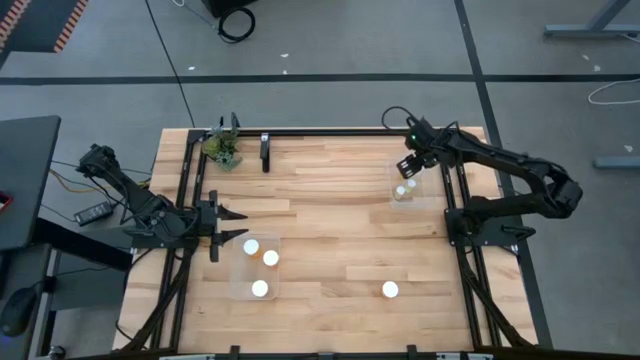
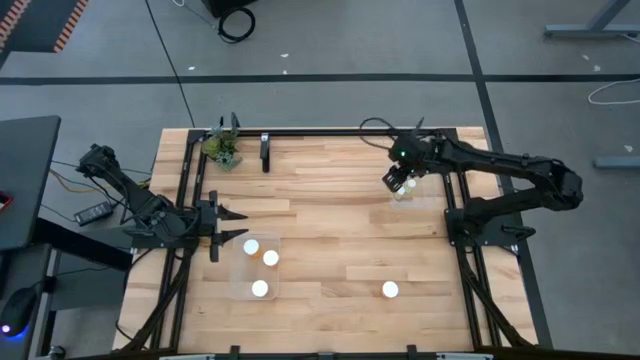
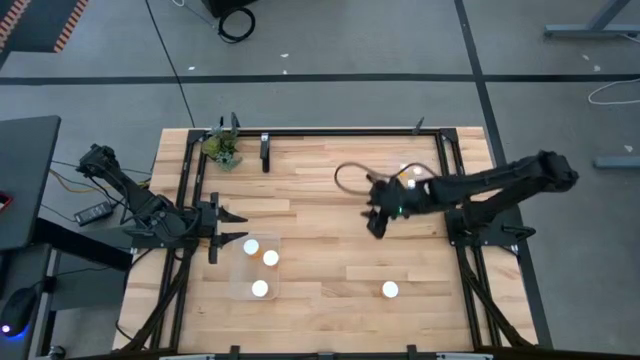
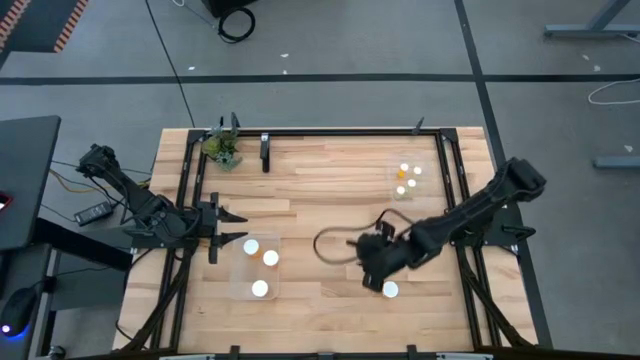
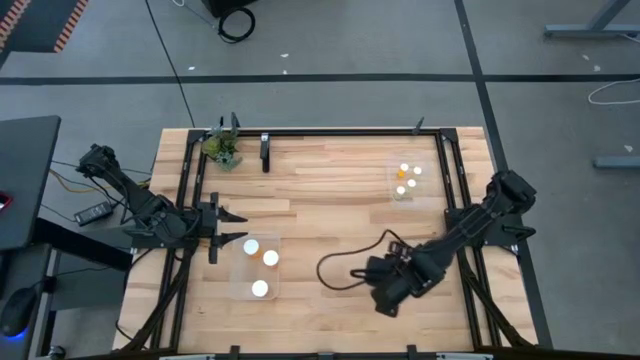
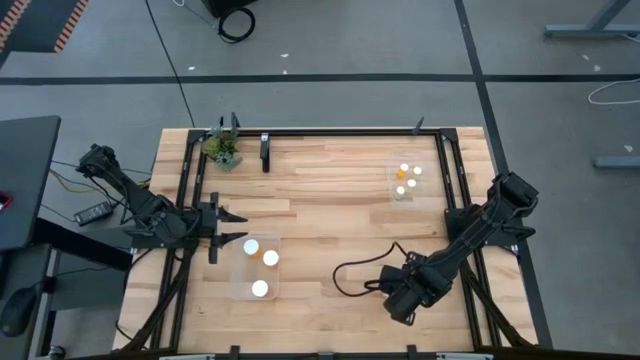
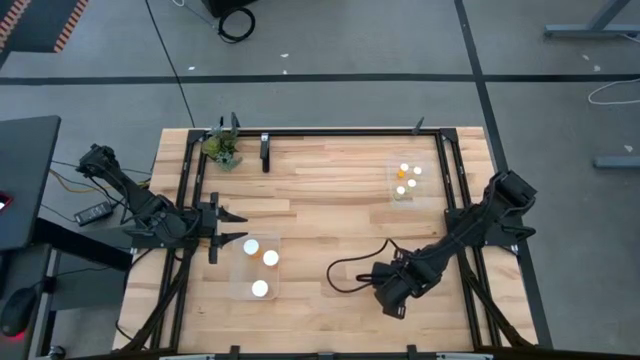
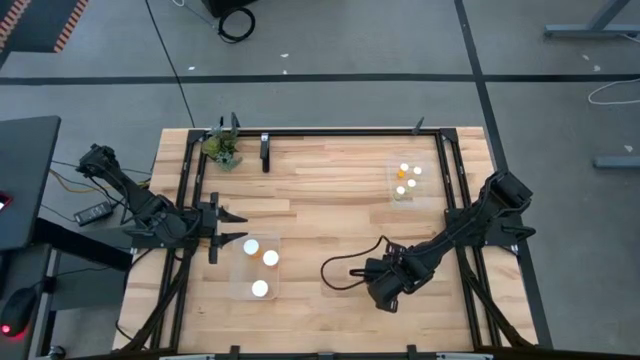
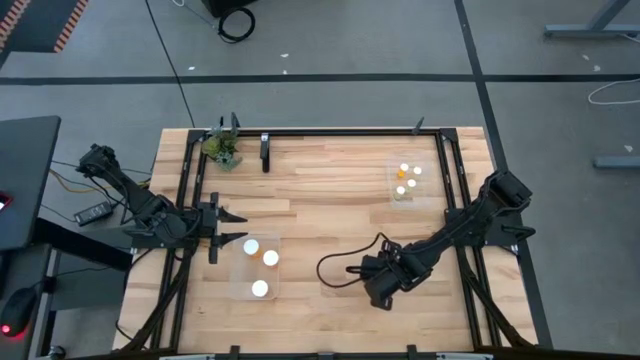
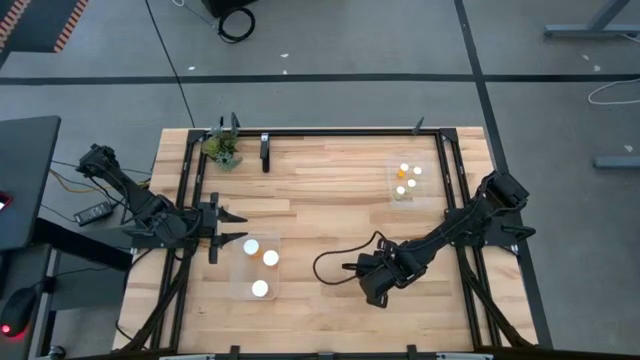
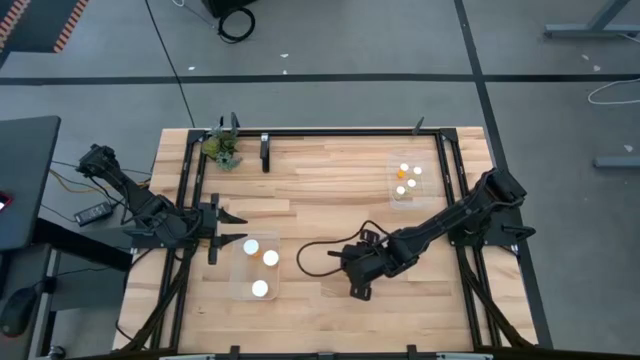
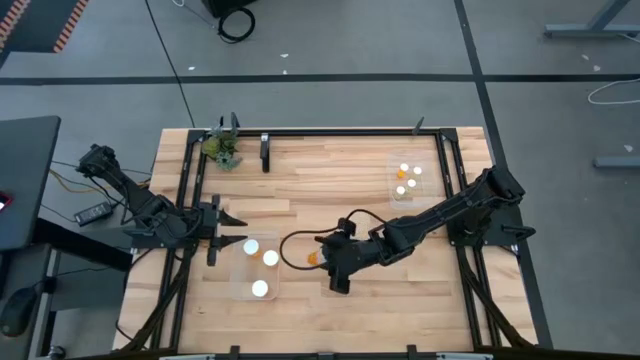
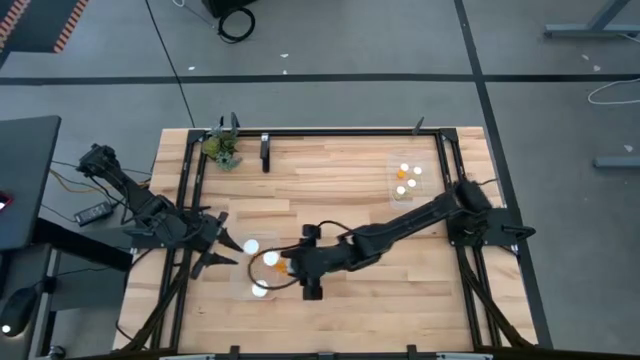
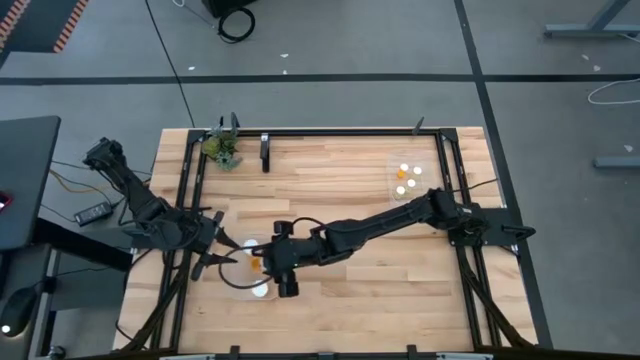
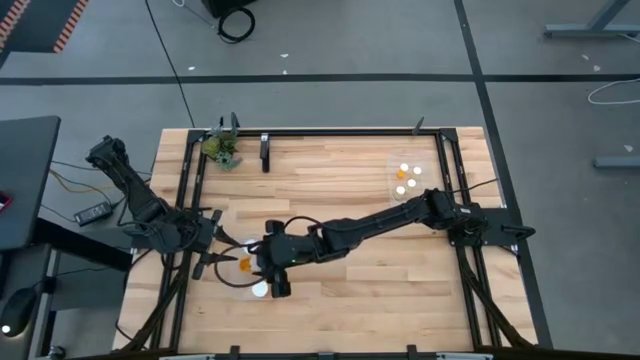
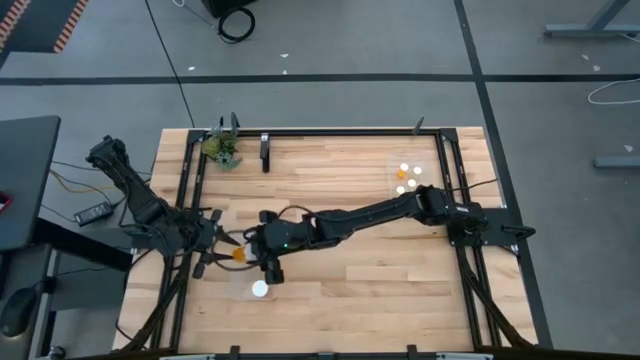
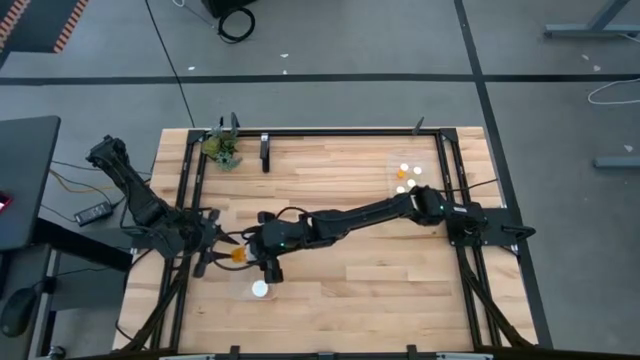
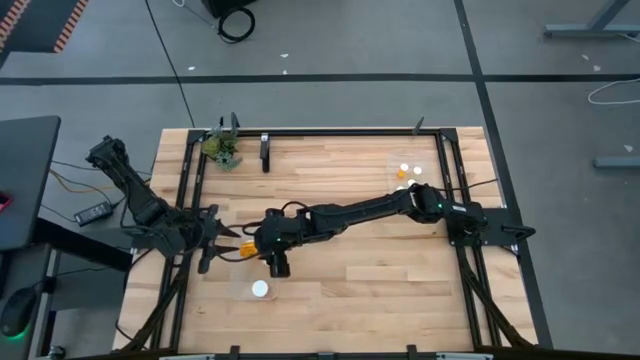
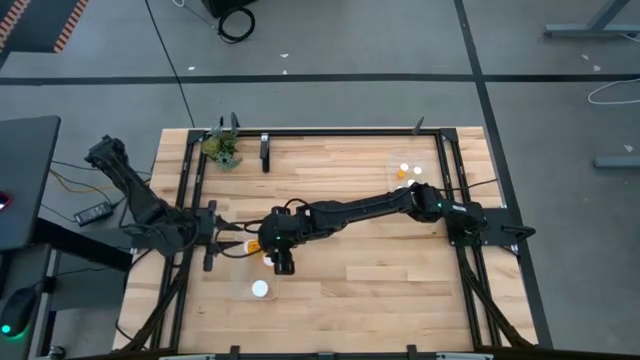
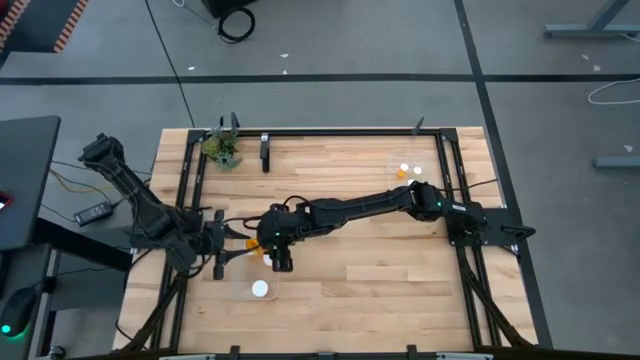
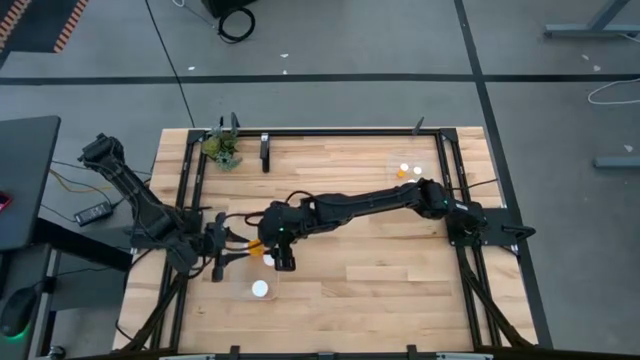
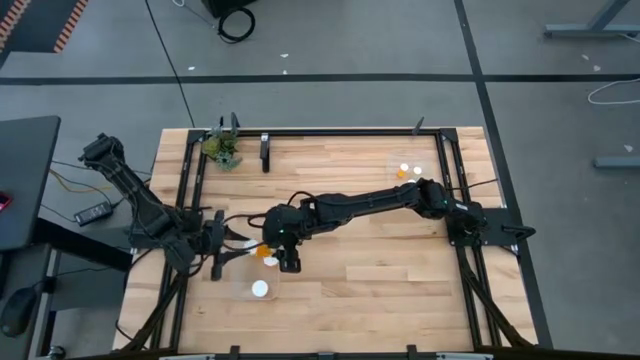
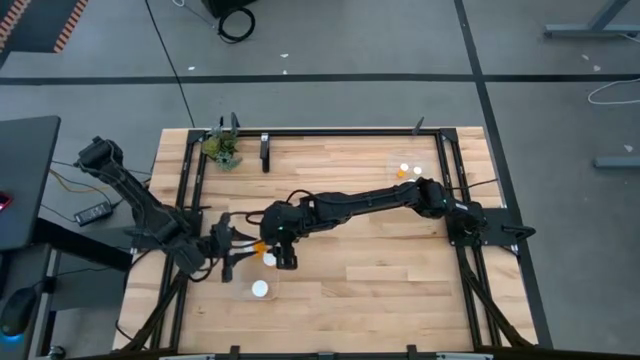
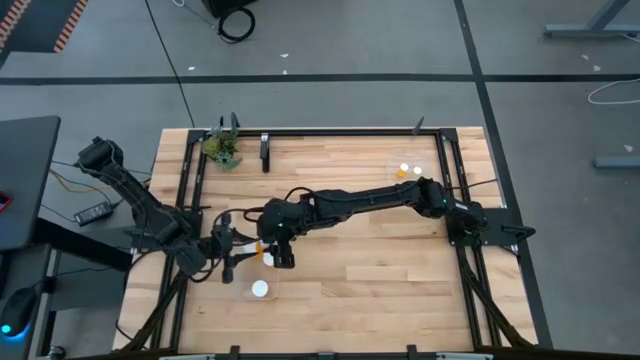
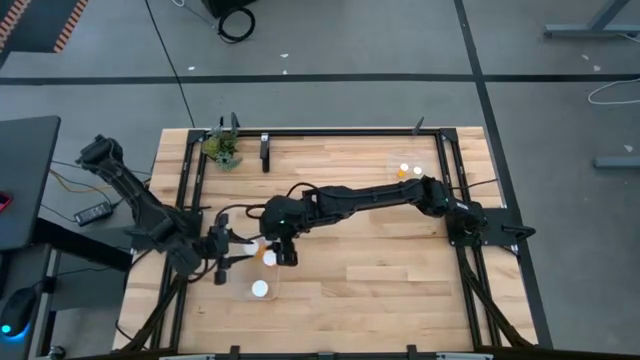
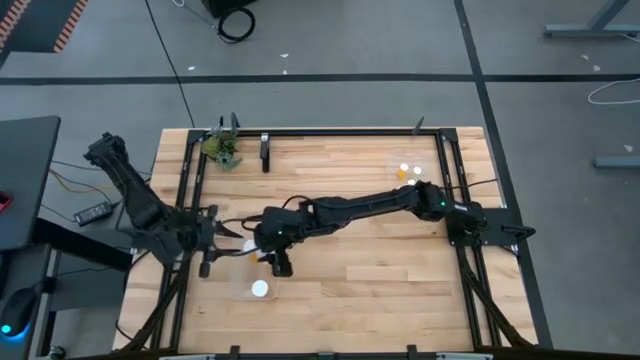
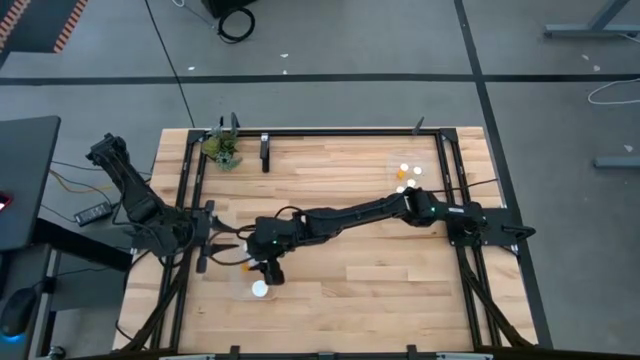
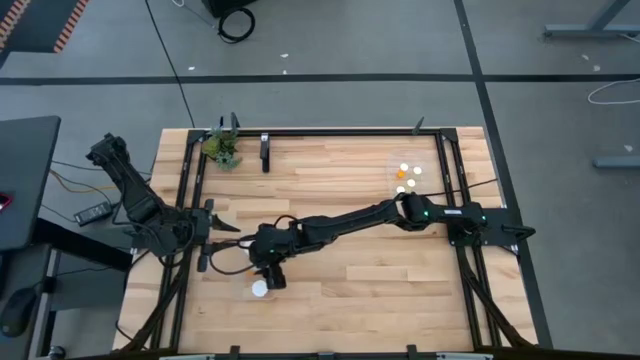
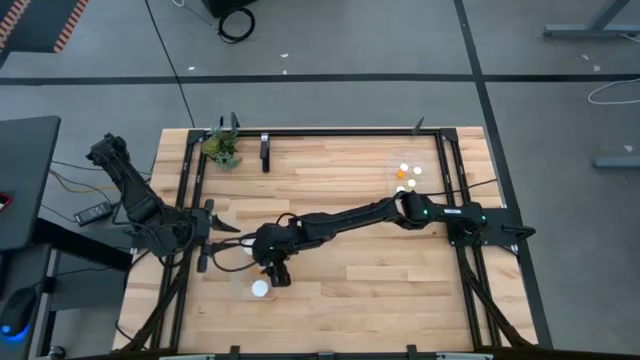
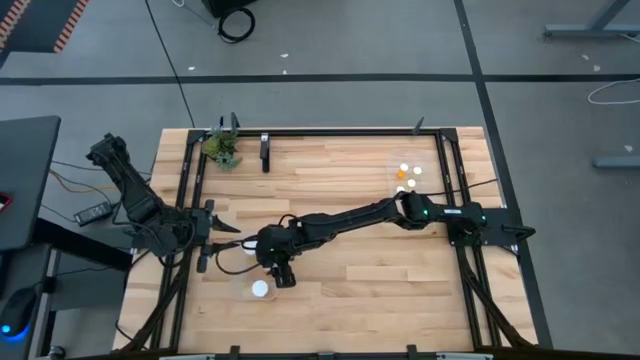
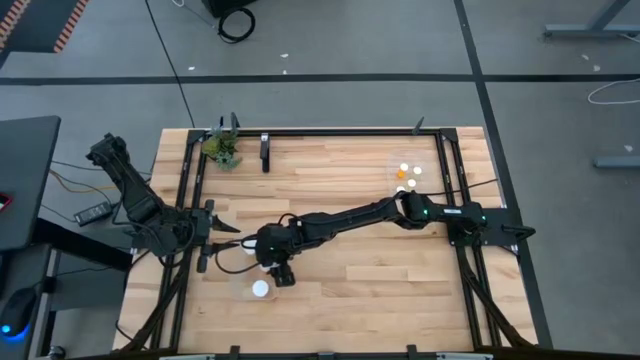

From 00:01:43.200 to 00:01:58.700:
Task: Pick and place medicine bottles into bin by pill shape (circle, oval)
Put the large orange pill bottle into the bottom transparent bin

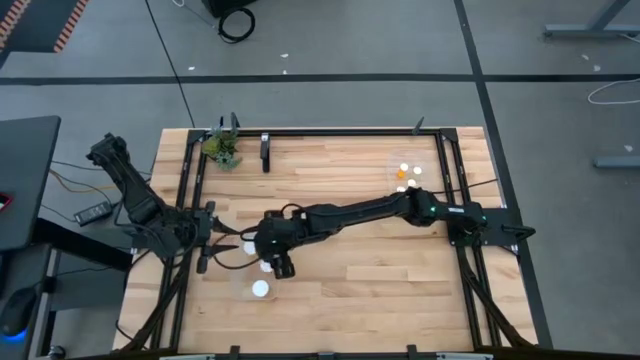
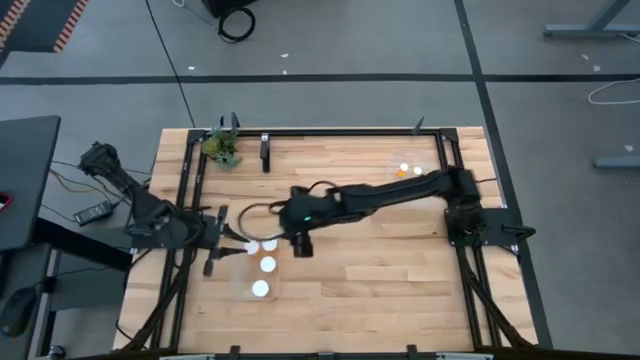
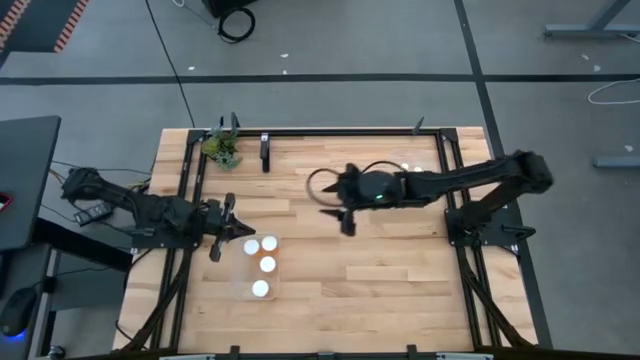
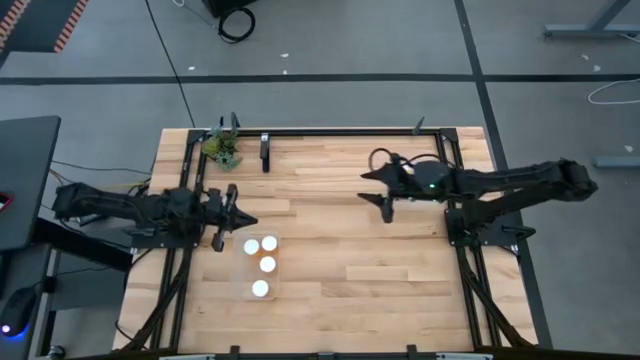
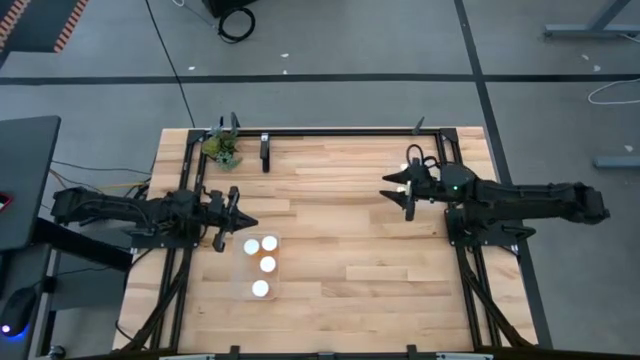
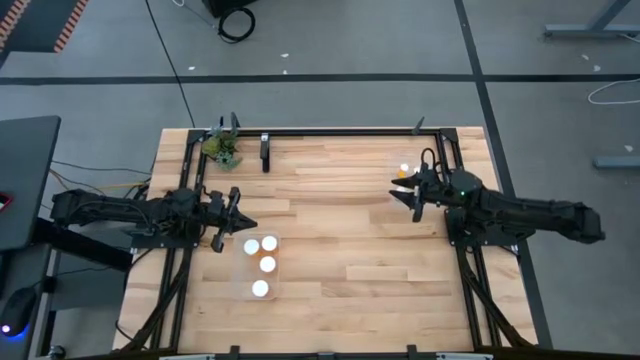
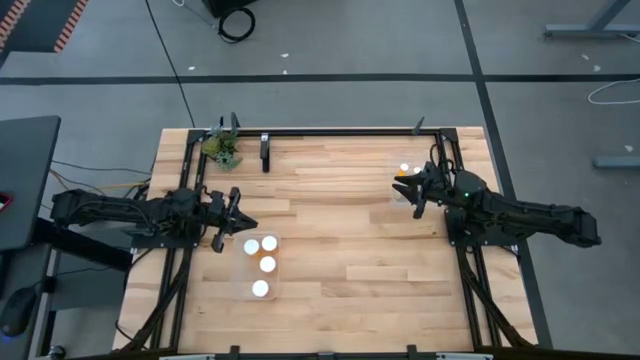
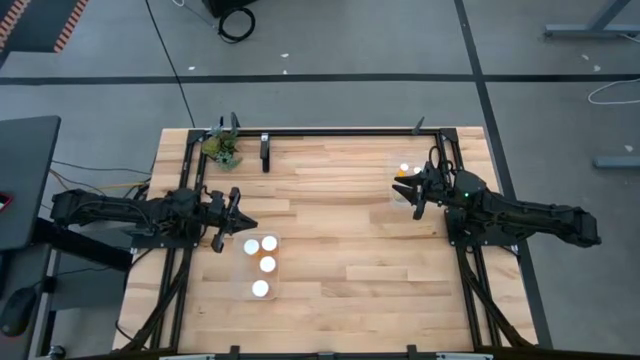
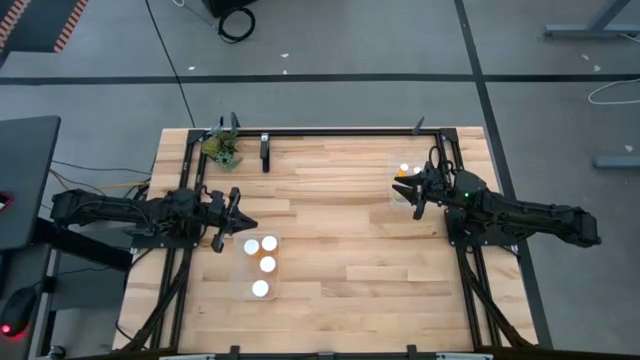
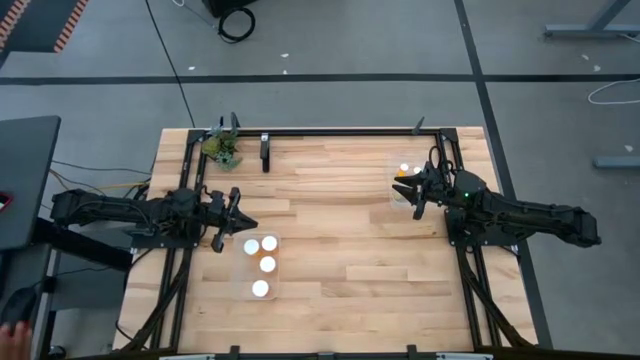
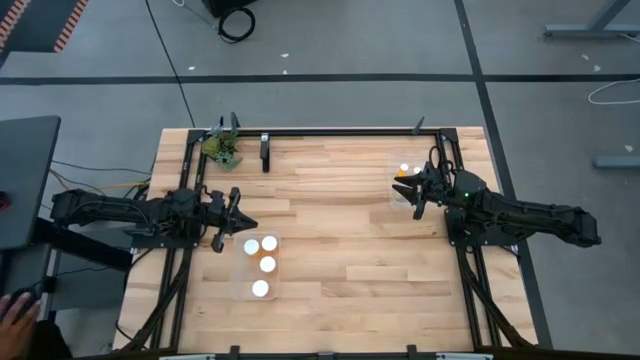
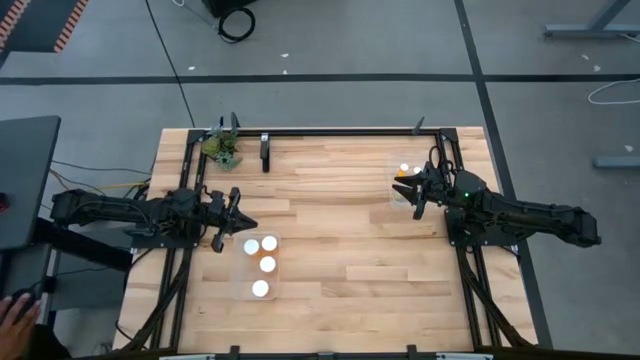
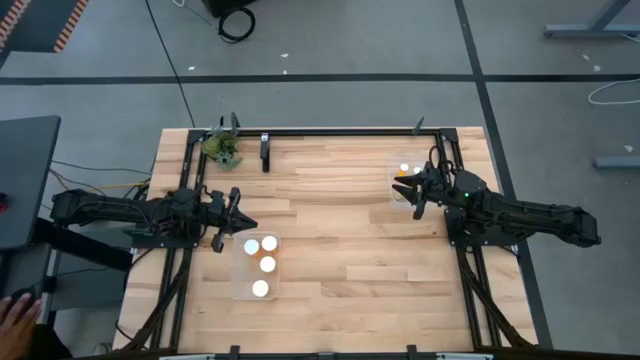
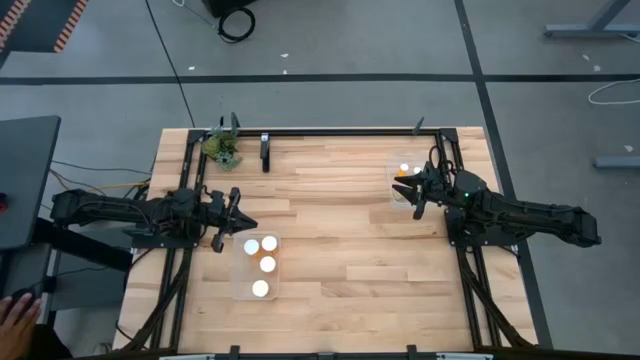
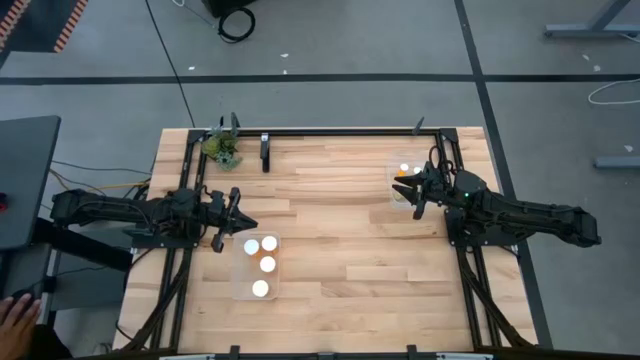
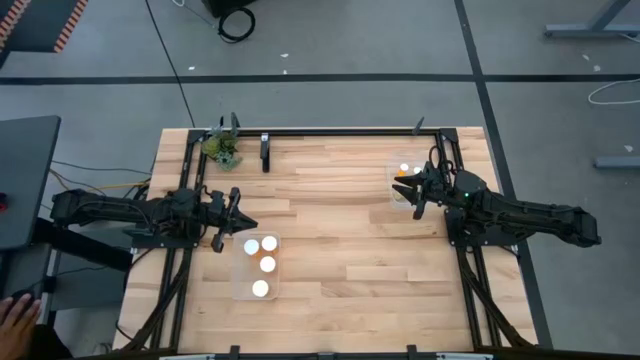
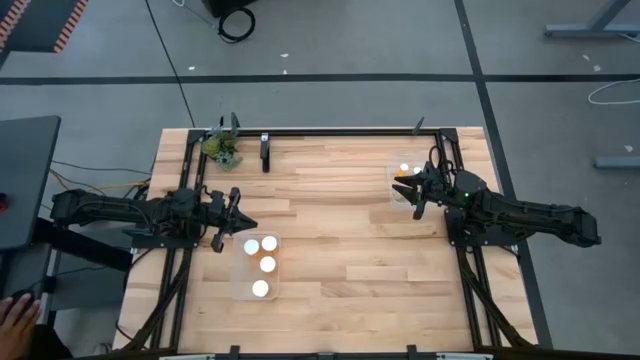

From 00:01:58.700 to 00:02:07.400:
Return to Home Position
